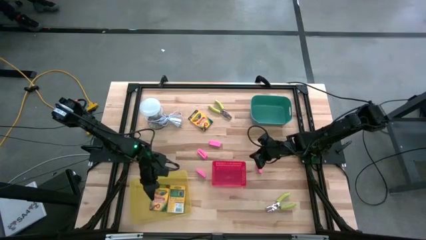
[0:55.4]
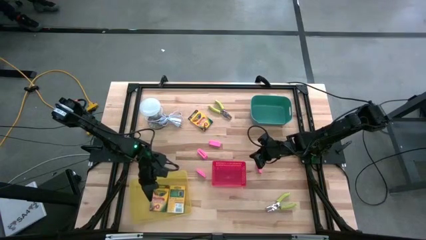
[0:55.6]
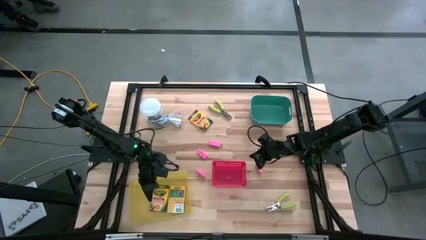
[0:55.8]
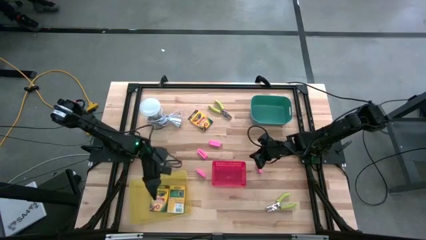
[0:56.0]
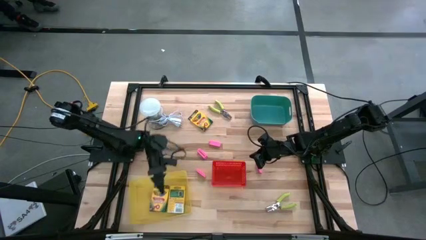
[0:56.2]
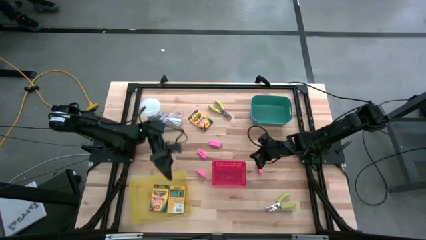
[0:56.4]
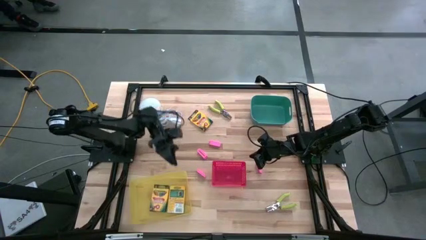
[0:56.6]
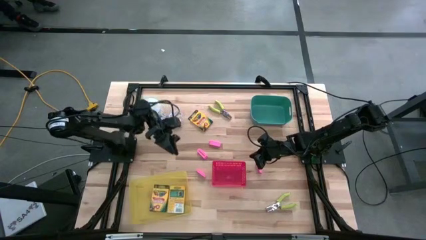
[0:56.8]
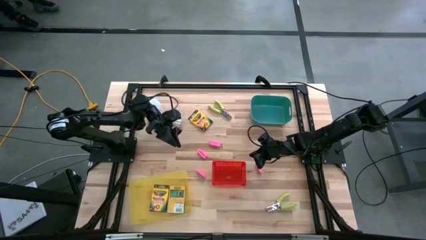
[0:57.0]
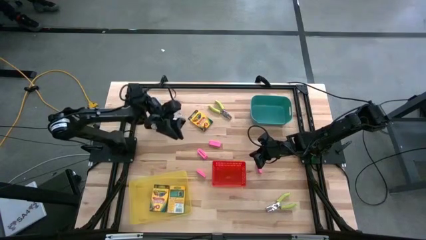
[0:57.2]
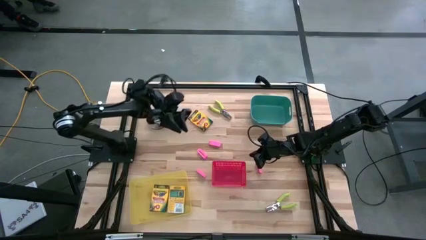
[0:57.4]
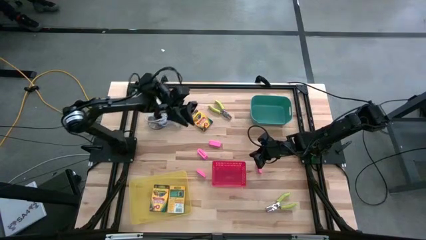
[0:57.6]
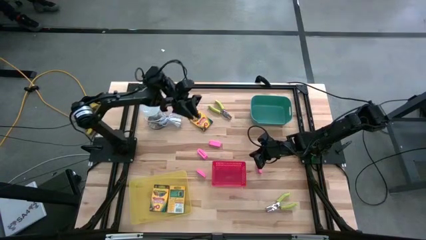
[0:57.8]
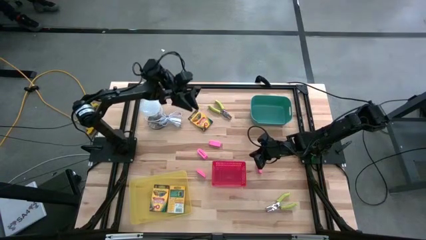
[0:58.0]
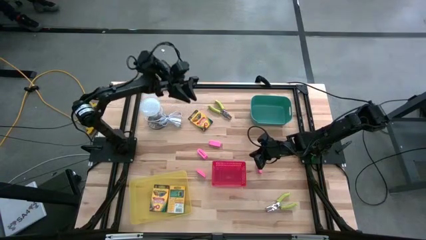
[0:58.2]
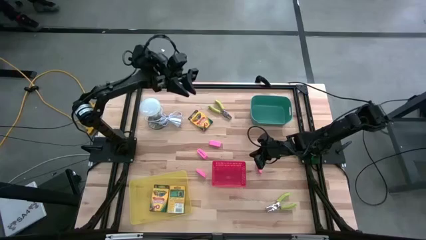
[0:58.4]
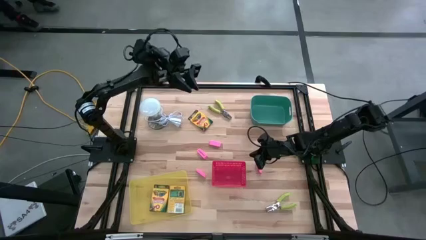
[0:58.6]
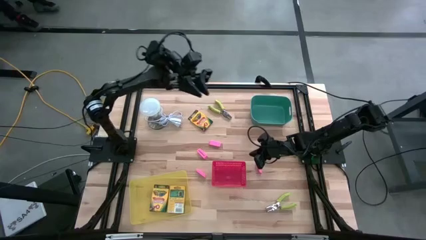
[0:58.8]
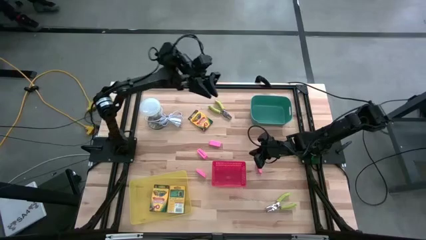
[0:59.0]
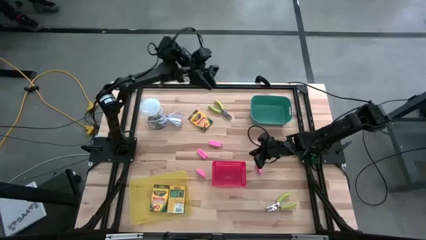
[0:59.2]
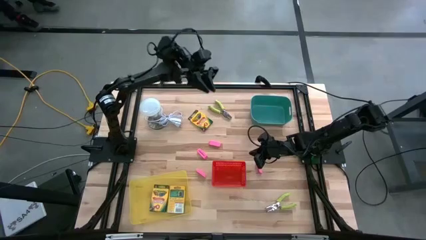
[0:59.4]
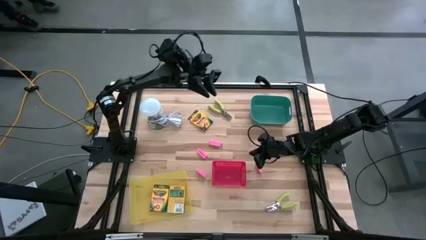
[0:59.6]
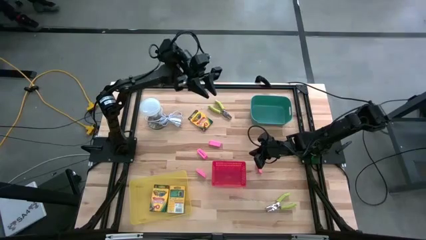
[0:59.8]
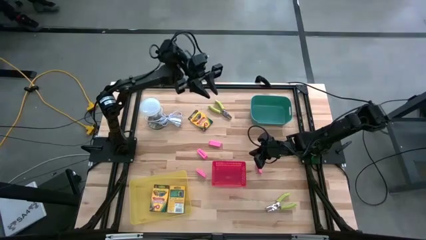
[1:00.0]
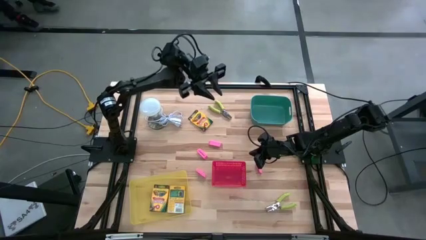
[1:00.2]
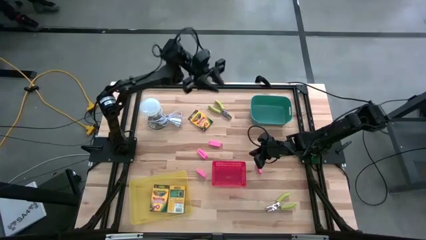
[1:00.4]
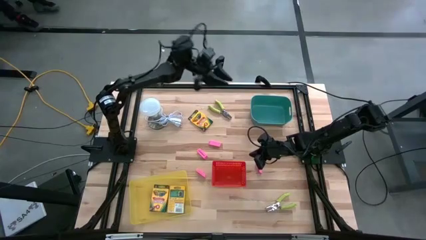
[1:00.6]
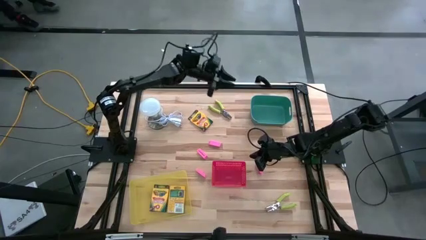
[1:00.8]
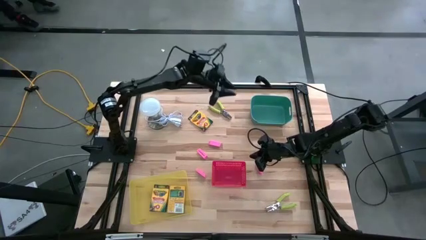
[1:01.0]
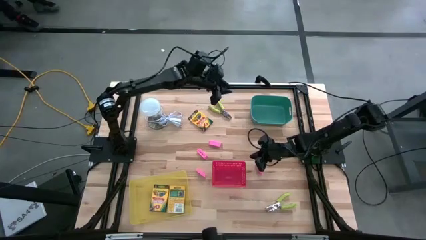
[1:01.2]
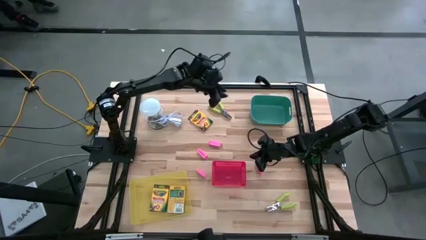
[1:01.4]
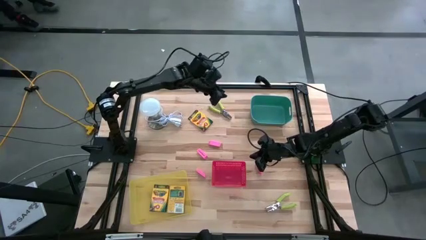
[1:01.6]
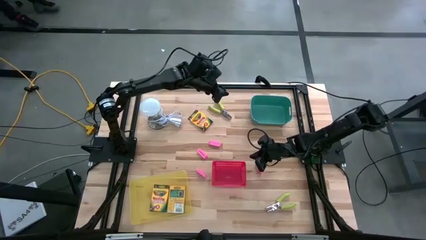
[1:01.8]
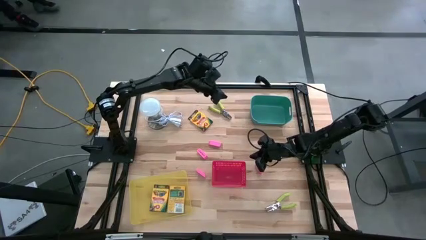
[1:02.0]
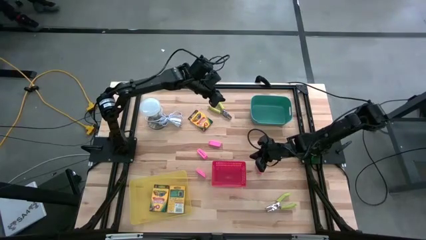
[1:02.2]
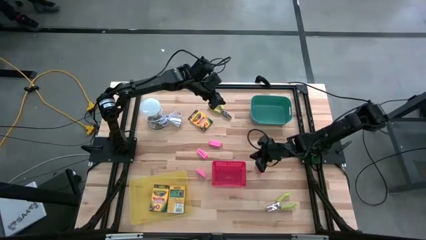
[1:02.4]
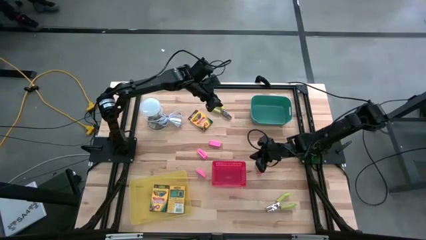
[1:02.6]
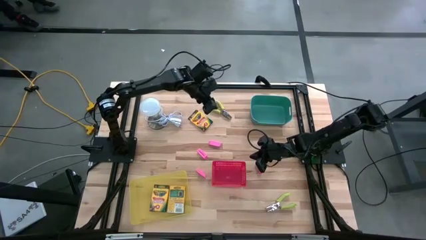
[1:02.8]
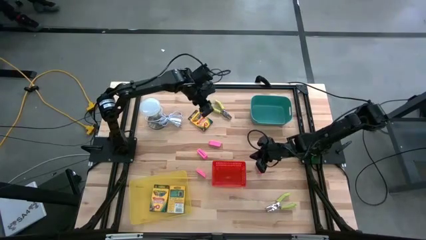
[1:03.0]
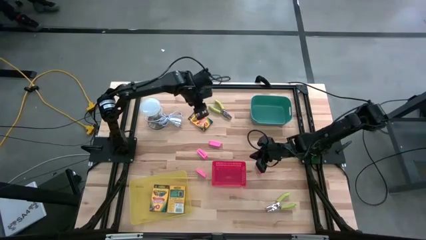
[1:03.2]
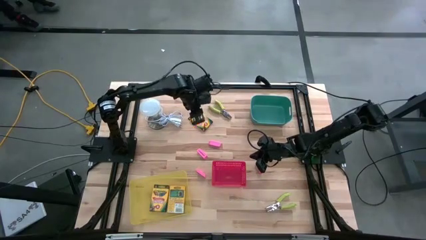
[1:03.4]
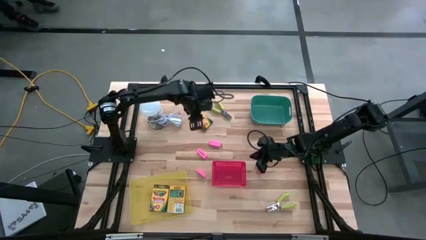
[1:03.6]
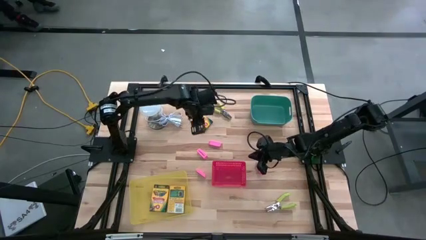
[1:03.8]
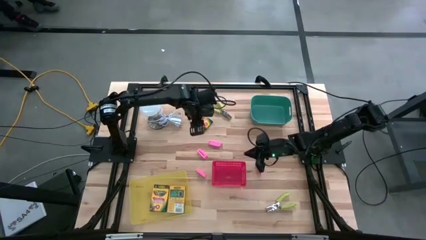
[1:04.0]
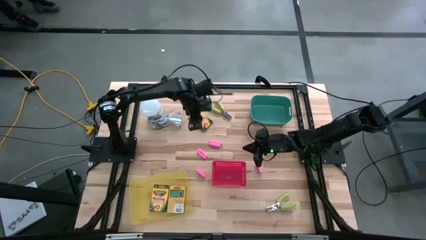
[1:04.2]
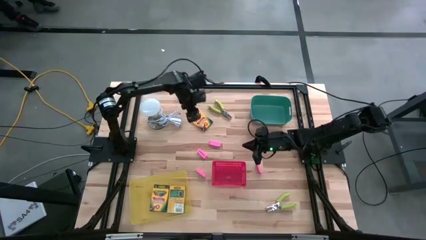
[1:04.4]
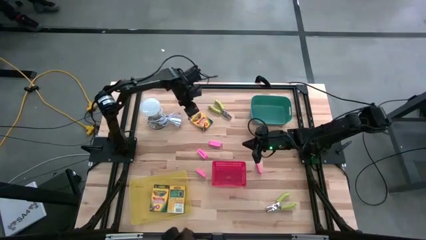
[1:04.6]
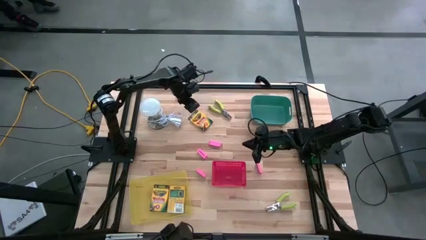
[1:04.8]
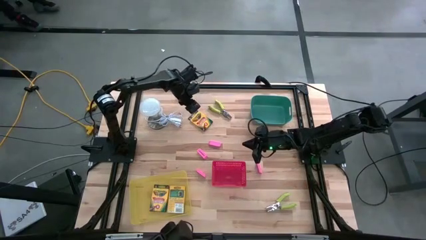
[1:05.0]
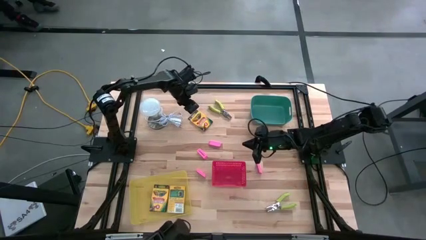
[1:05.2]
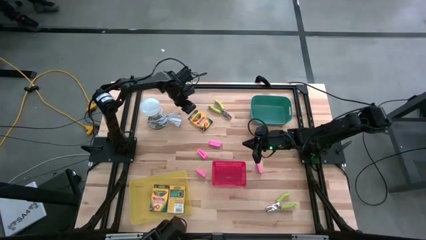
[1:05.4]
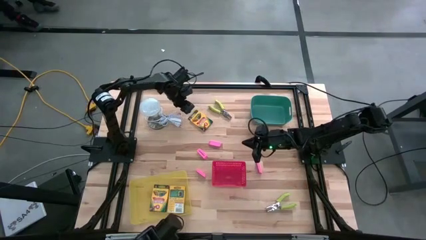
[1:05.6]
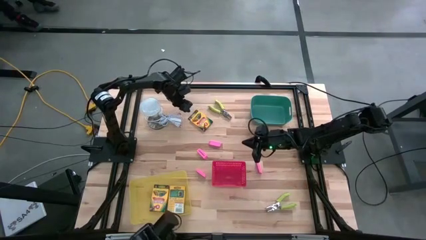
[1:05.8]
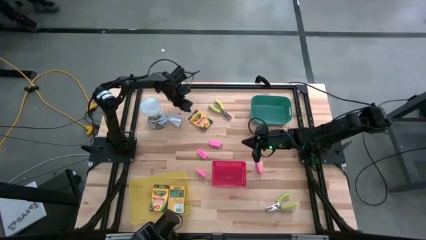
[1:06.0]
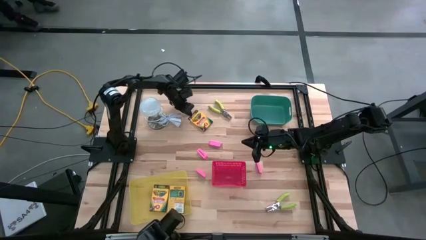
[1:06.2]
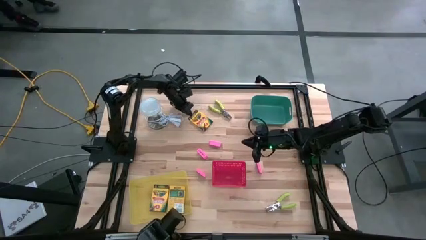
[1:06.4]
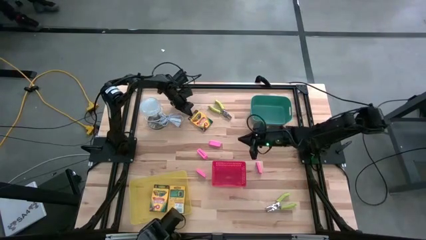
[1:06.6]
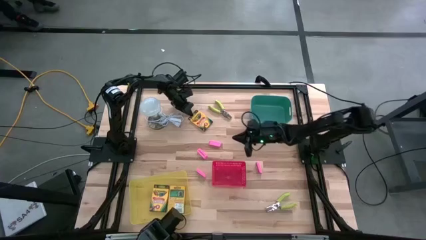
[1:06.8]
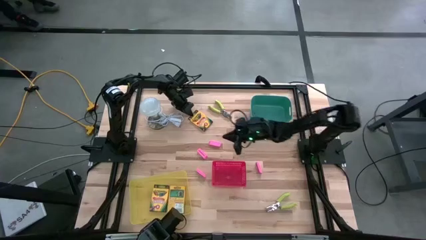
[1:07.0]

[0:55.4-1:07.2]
Task: Pick & Place School Supplies
Put the yellow crayon box into the yellow bin

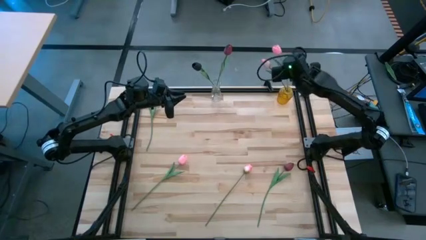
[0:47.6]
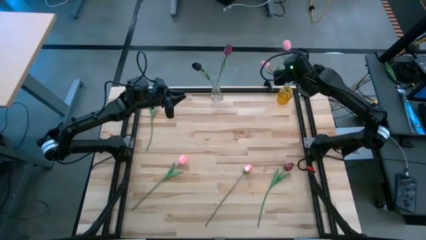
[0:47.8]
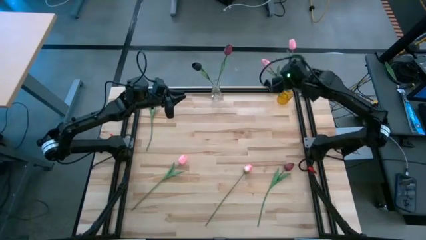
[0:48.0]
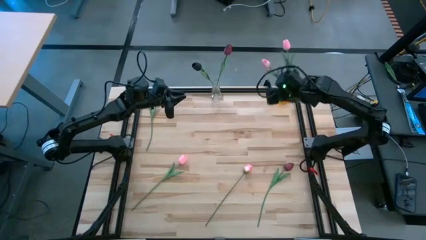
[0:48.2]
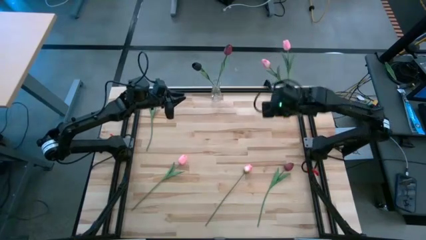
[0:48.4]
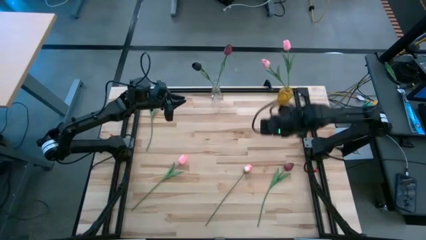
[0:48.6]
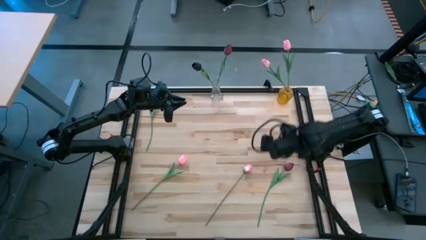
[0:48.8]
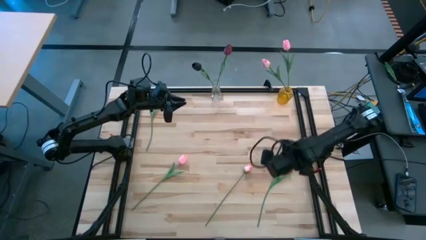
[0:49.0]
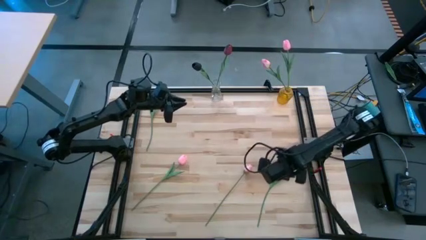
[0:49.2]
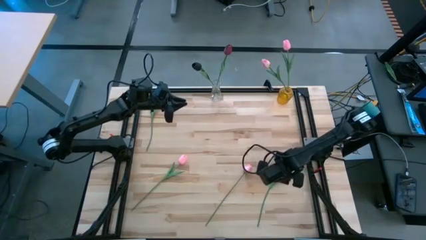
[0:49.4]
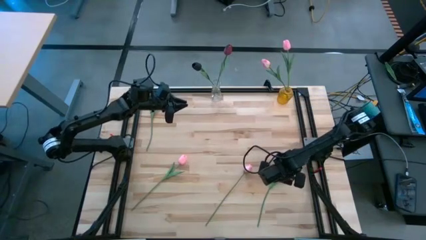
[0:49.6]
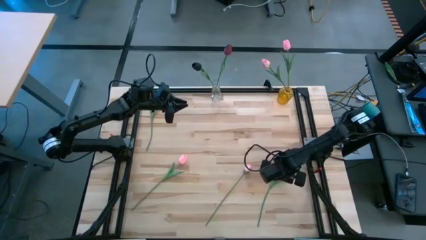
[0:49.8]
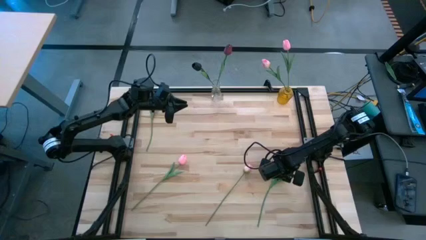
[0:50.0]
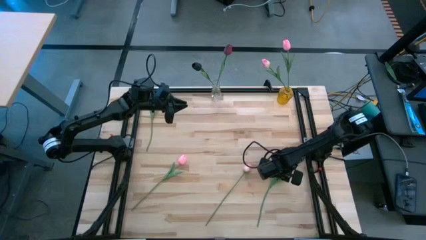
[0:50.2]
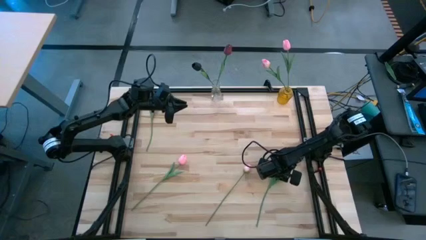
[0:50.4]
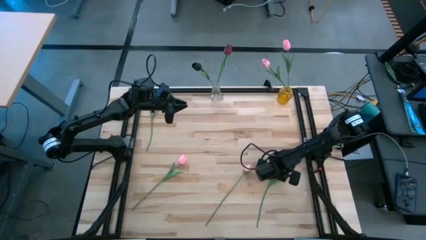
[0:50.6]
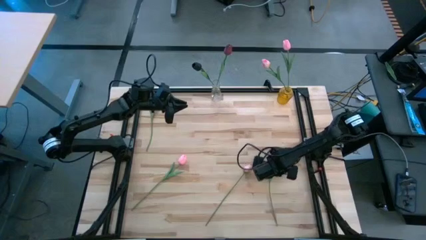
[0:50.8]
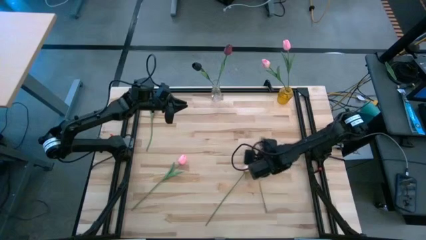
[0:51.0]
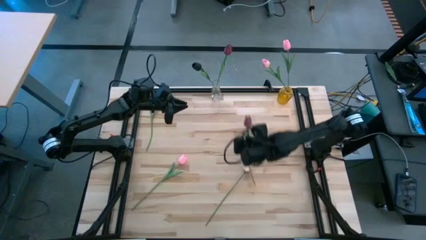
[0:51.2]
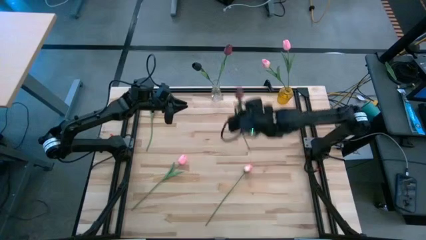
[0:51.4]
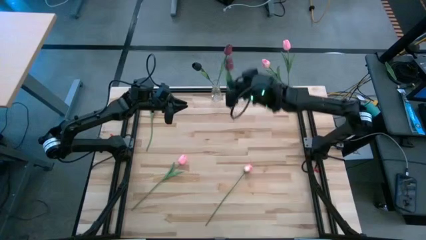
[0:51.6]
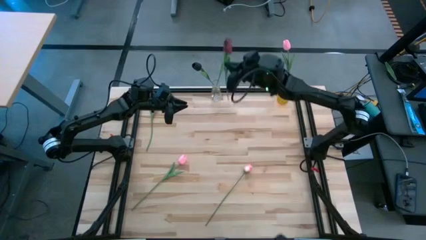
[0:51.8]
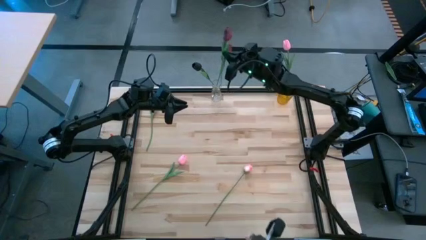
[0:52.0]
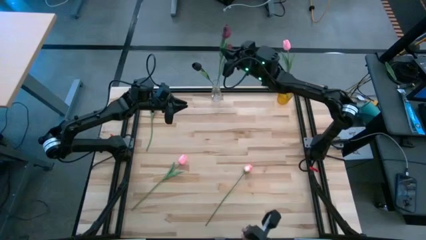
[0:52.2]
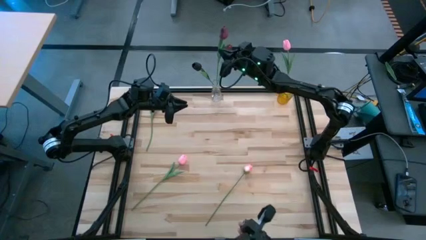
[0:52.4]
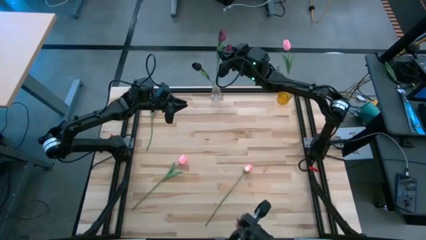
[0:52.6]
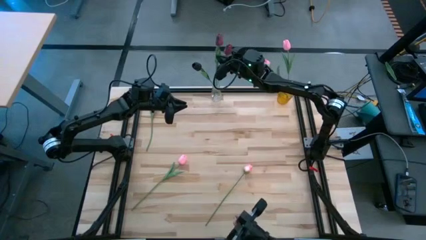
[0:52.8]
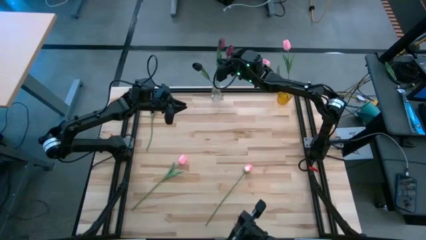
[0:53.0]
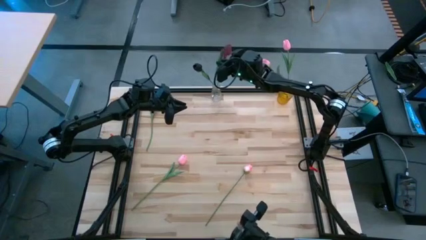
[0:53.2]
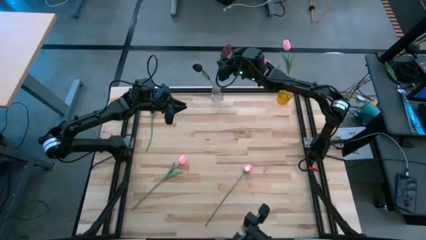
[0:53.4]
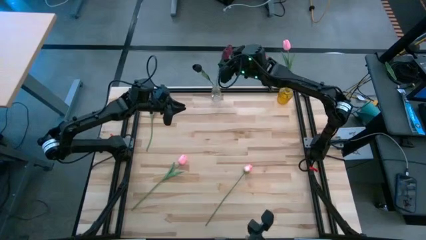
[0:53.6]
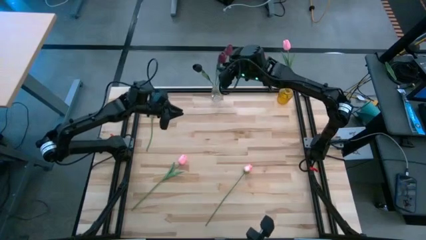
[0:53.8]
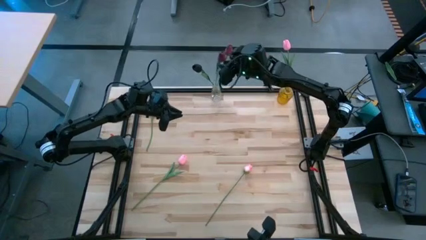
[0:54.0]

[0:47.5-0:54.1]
Task: Sort flowers into vase by color
Put the red tulip into the crystal vase
